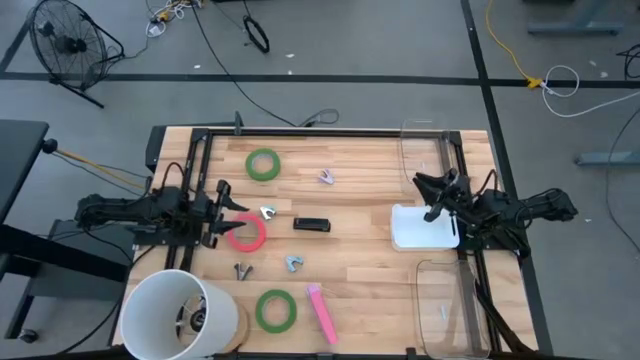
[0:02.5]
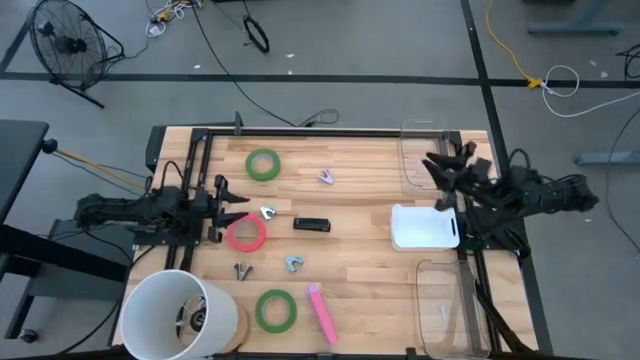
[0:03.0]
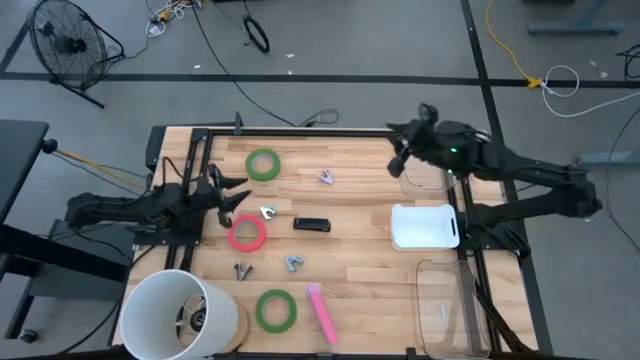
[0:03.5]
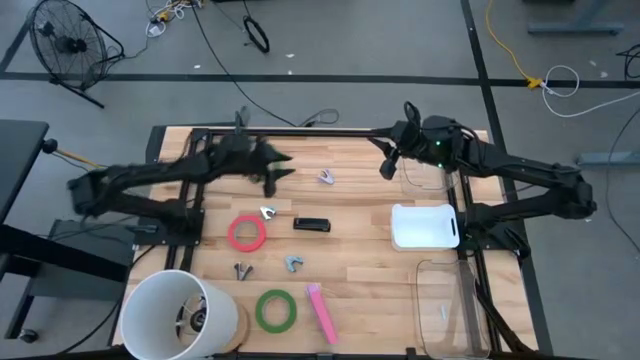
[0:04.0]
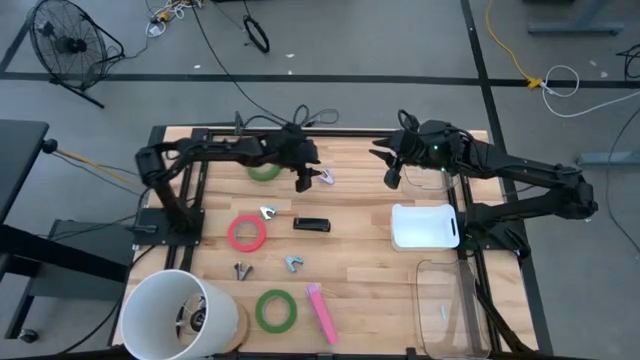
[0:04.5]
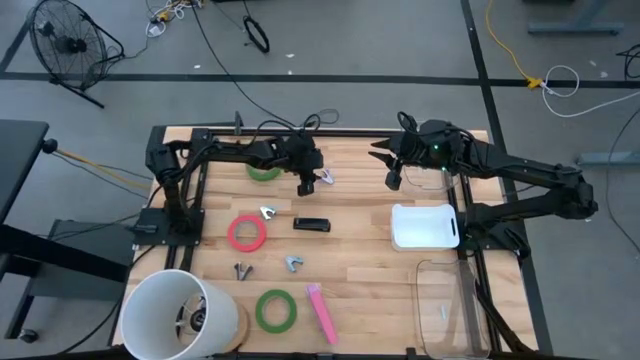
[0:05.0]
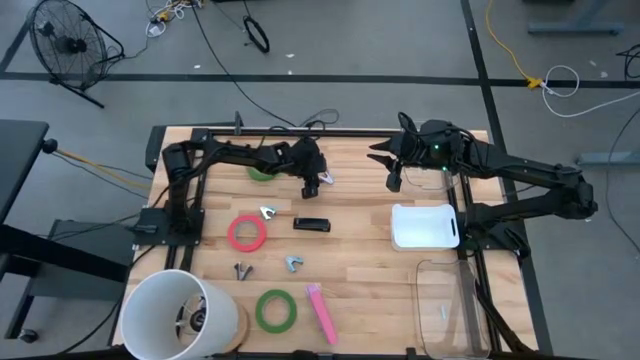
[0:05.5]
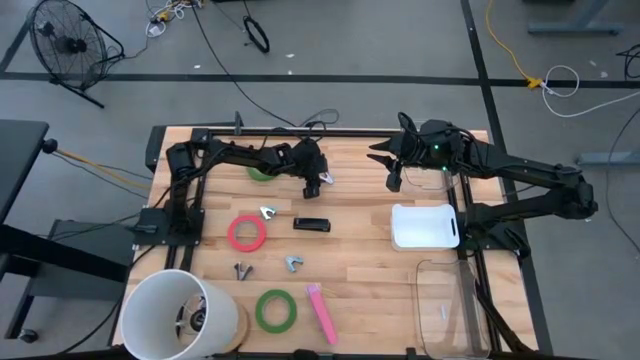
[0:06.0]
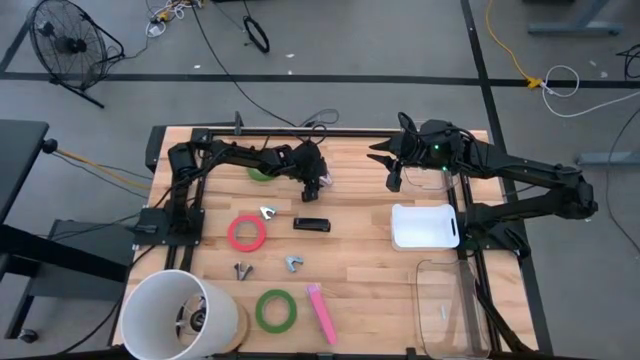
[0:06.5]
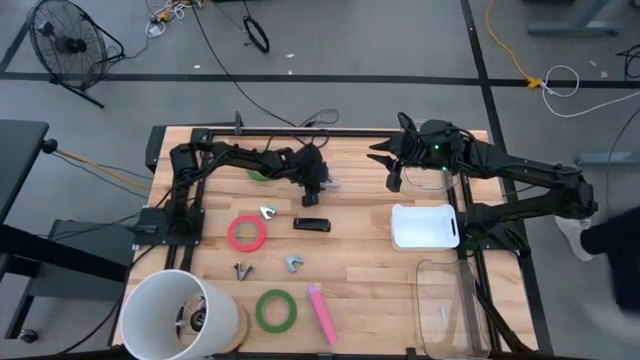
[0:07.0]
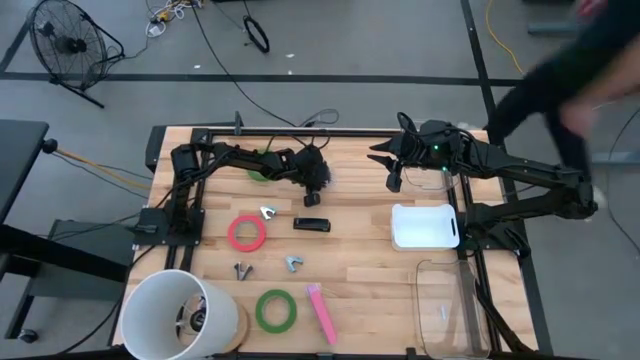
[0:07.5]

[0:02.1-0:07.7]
Task: Pick and place Stapler, Stapler remover, tape
Put the purple staple remover into the white bin

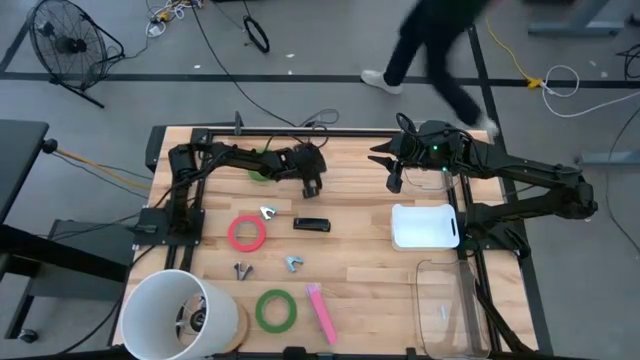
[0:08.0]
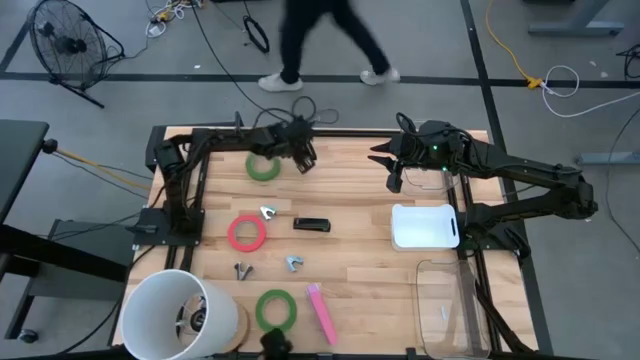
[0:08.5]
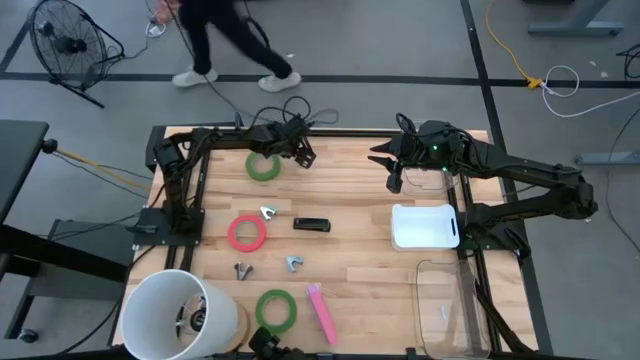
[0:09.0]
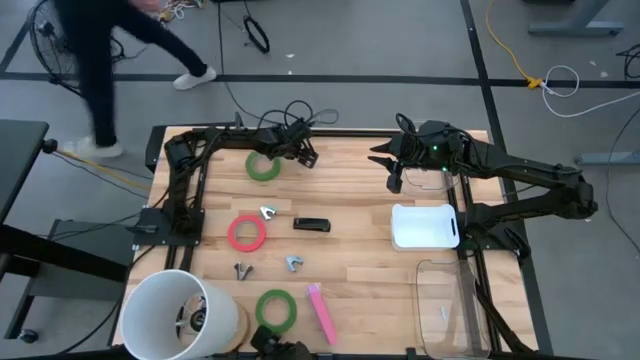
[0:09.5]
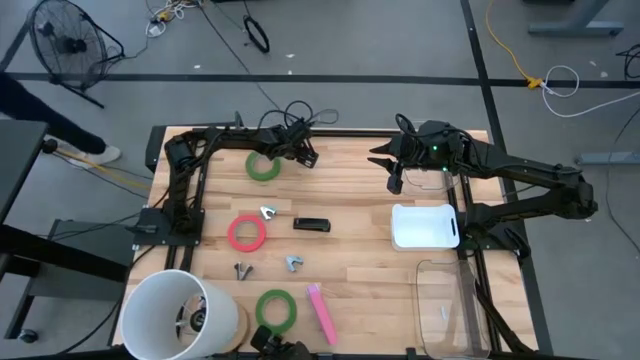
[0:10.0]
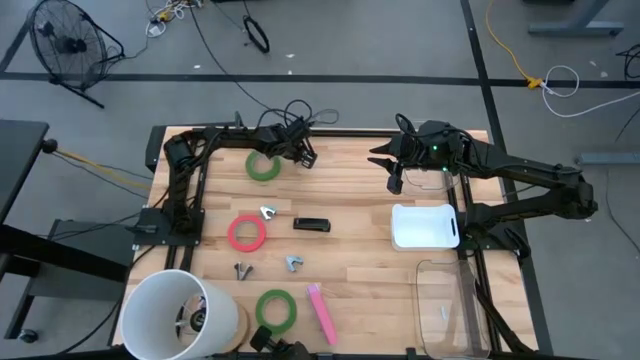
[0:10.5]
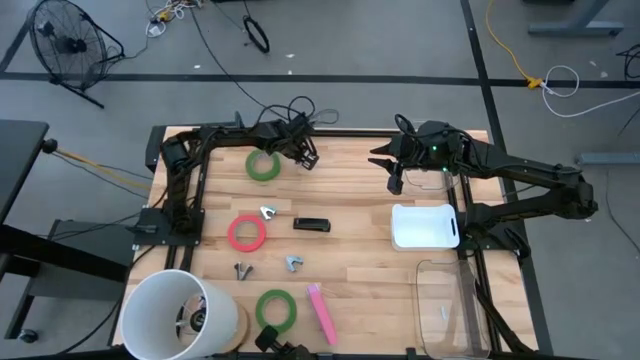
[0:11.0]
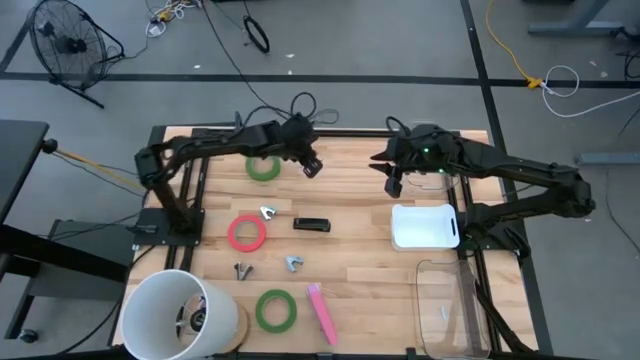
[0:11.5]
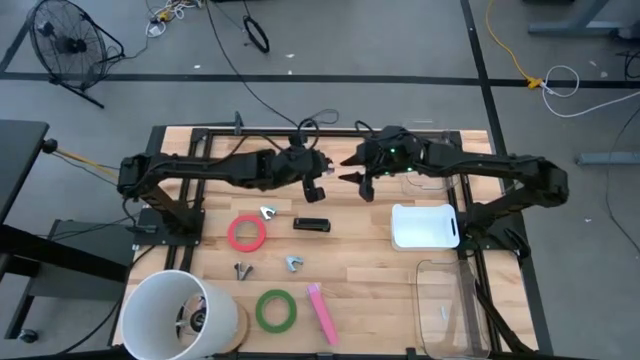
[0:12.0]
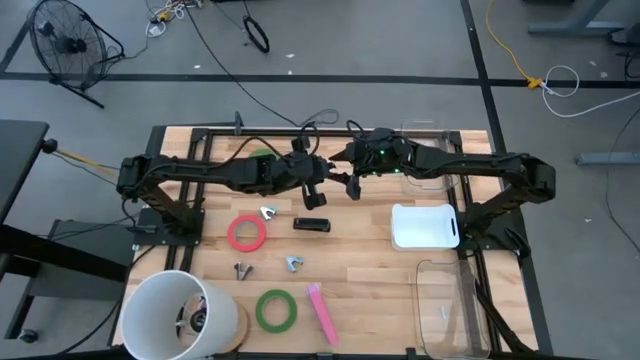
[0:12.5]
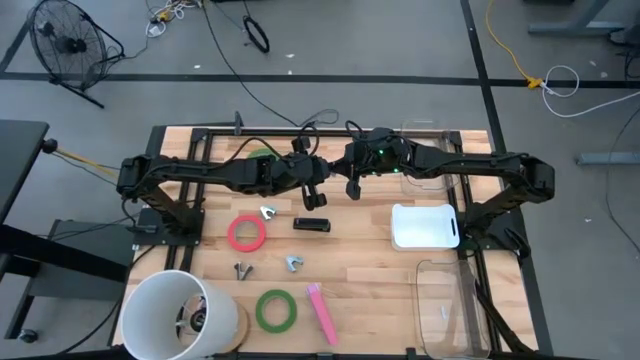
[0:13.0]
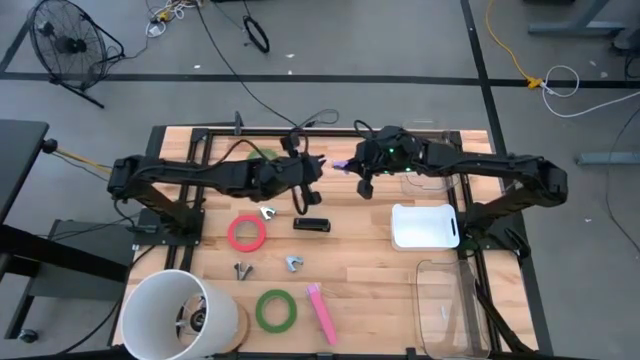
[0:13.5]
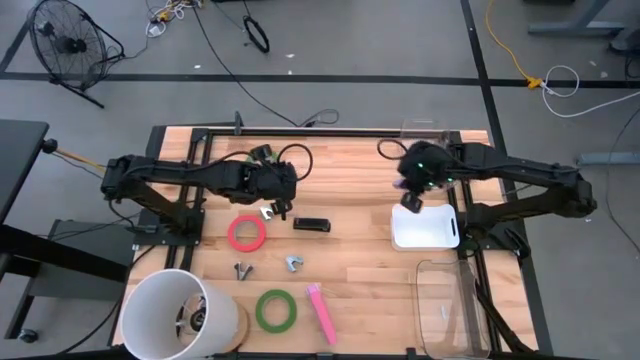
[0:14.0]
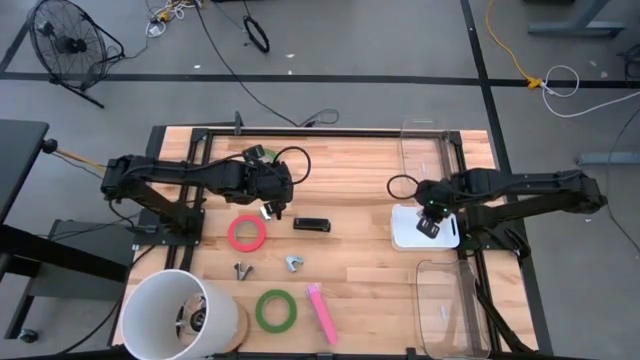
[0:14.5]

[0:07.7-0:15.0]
Put the purple staple remover into the white bin

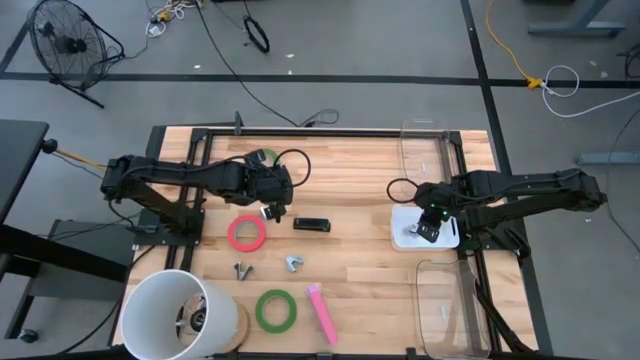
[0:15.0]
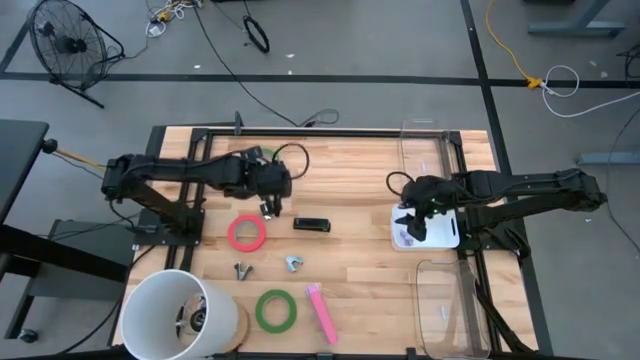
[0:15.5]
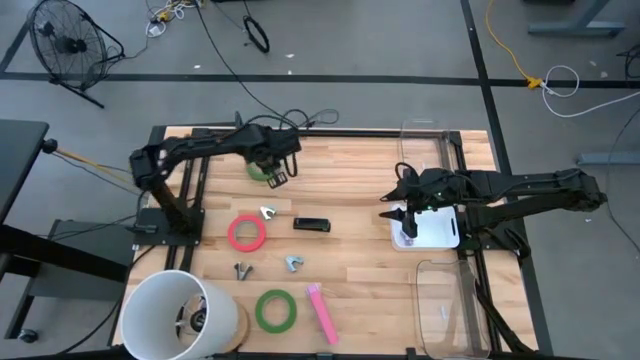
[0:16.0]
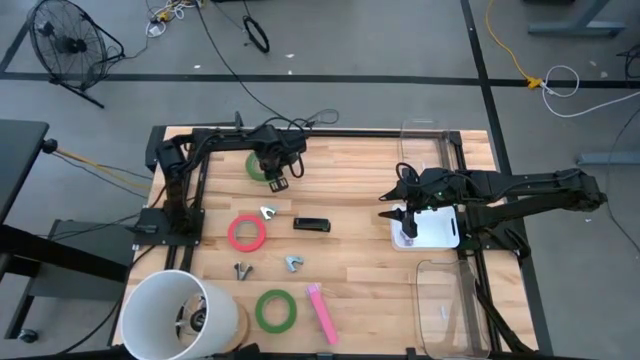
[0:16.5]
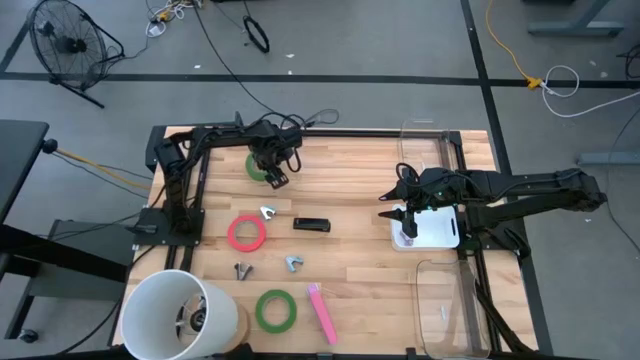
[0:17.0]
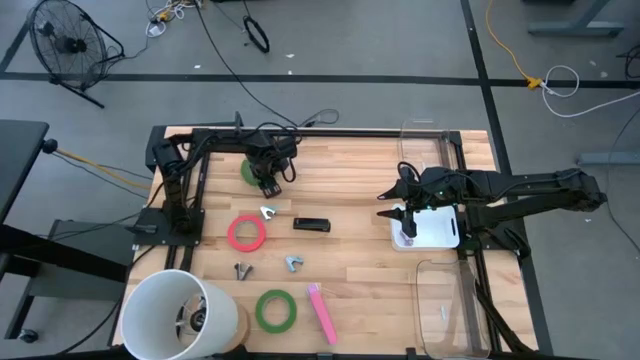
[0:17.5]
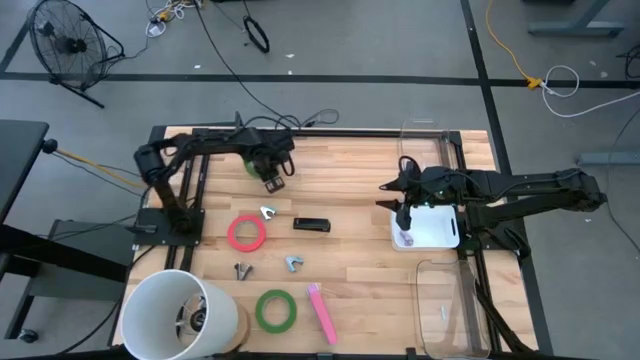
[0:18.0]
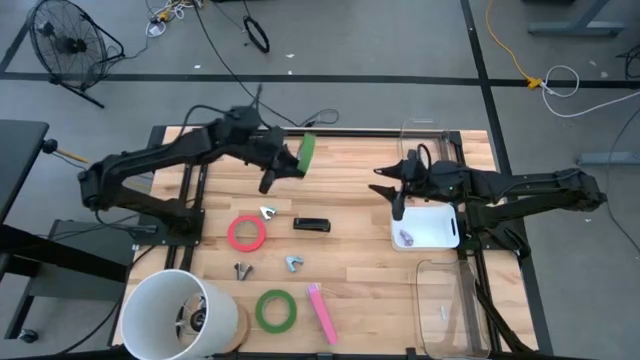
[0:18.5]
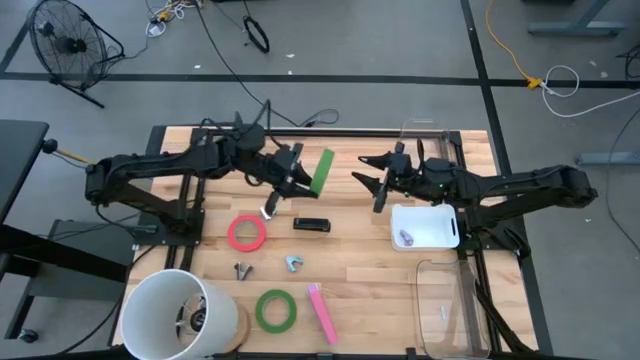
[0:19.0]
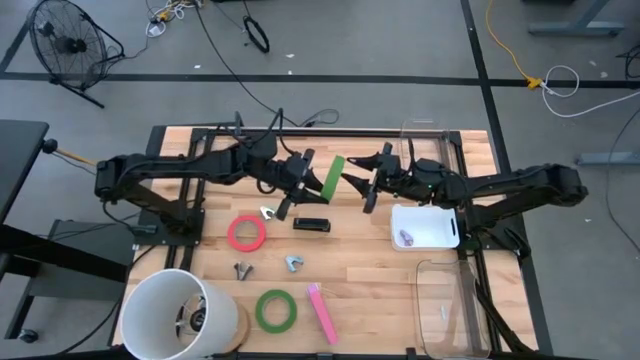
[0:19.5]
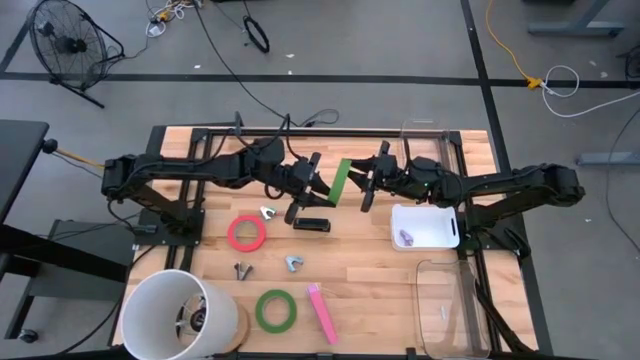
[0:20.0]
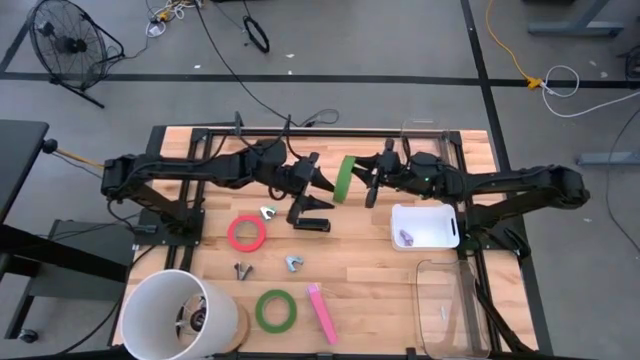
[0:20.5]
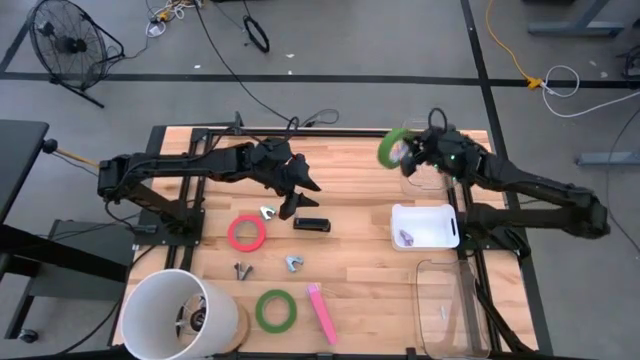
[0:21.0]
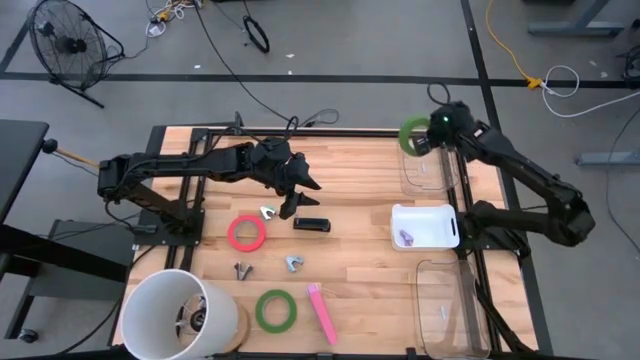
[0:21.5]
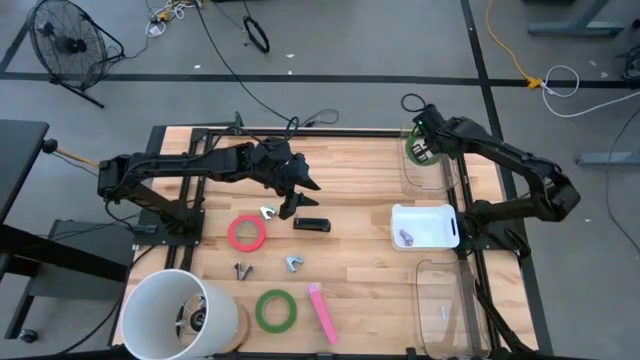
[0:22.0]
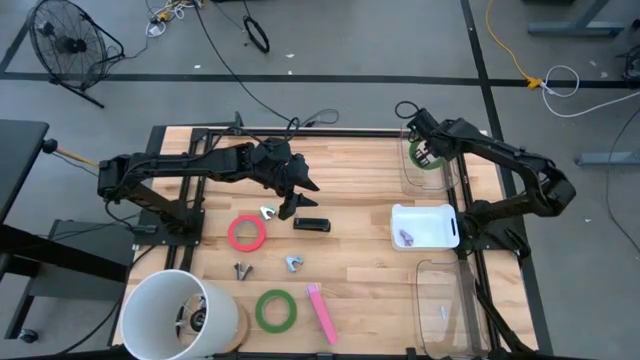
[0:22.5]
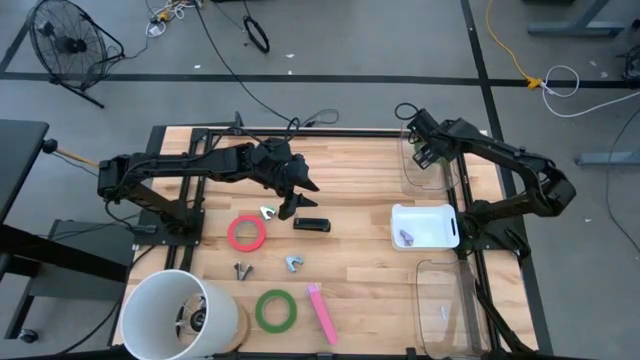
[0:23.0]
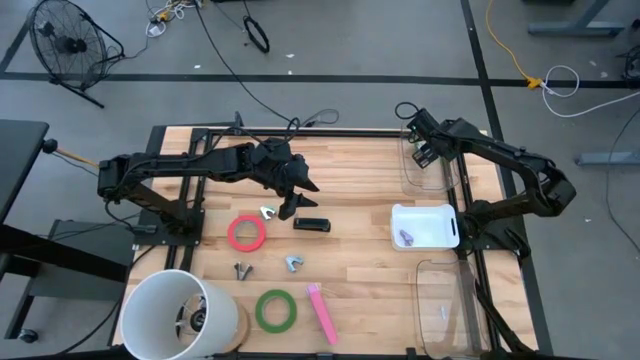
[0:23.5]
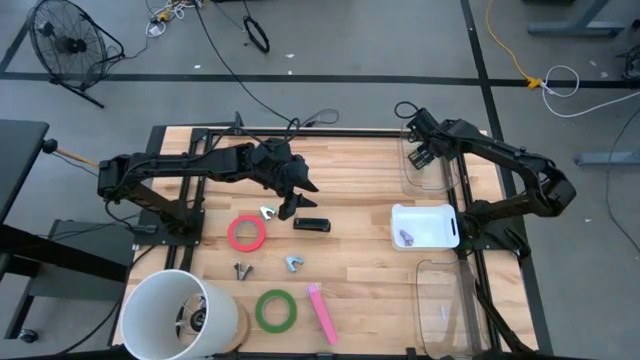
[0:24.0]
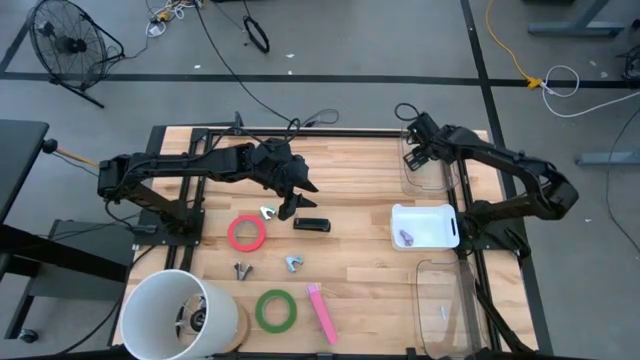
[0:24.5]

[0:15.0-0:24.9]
Put the top green tape into the top transparent bin
